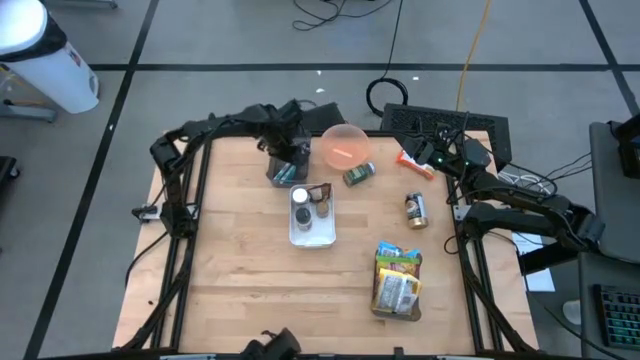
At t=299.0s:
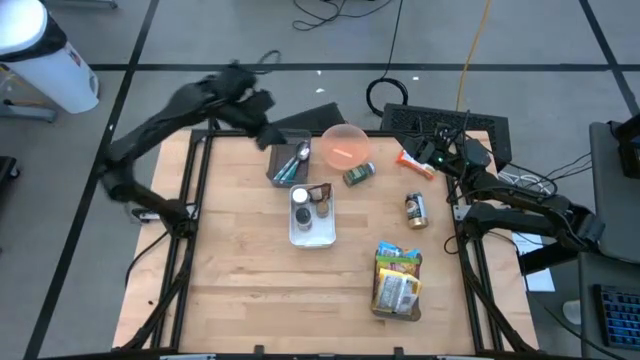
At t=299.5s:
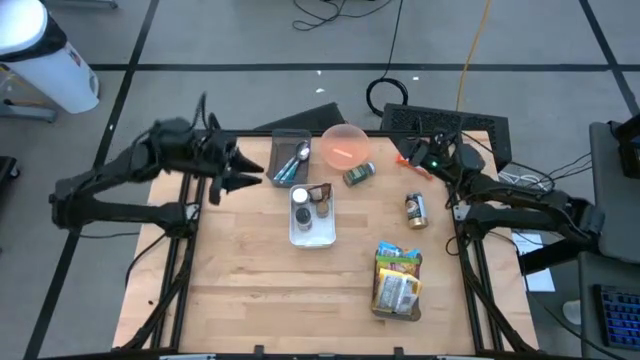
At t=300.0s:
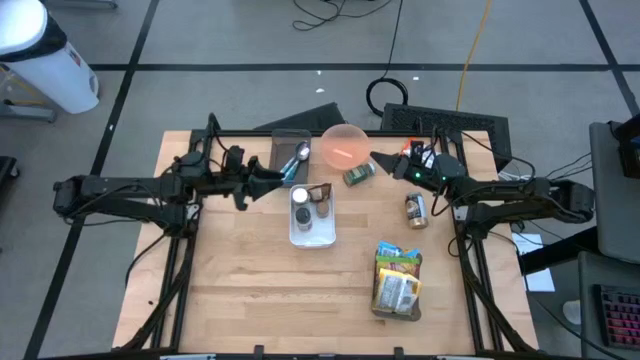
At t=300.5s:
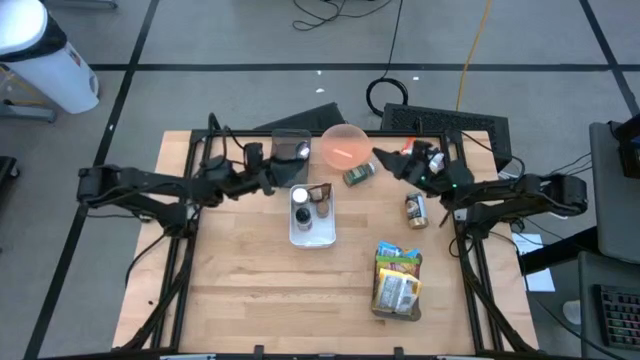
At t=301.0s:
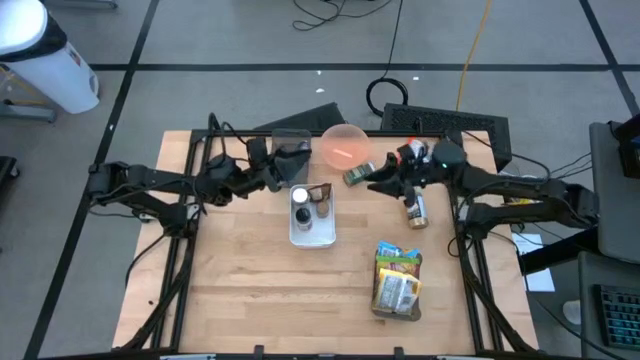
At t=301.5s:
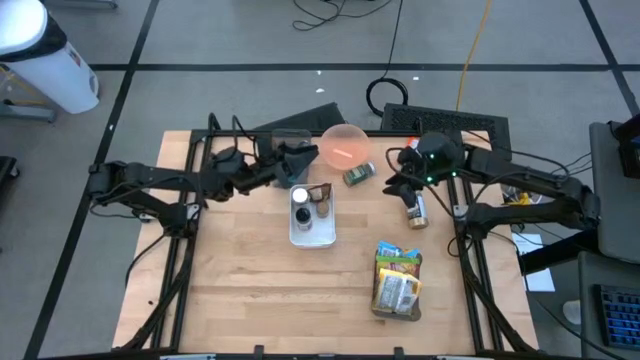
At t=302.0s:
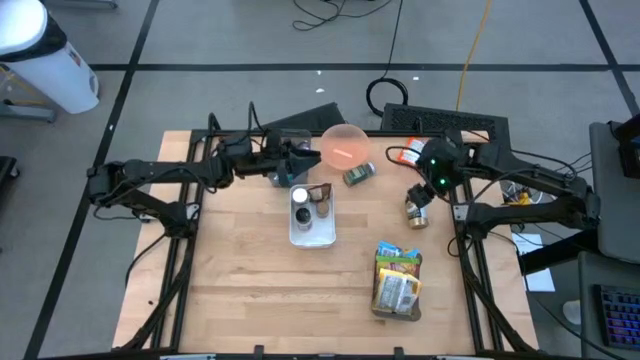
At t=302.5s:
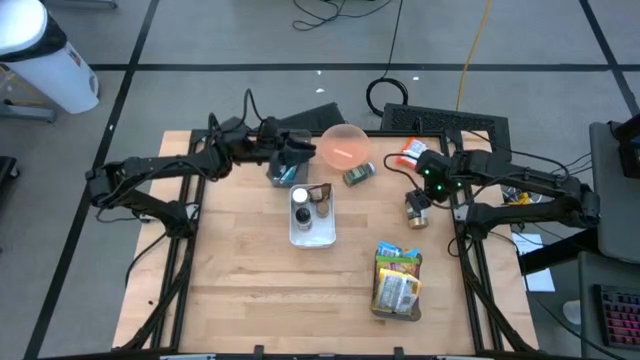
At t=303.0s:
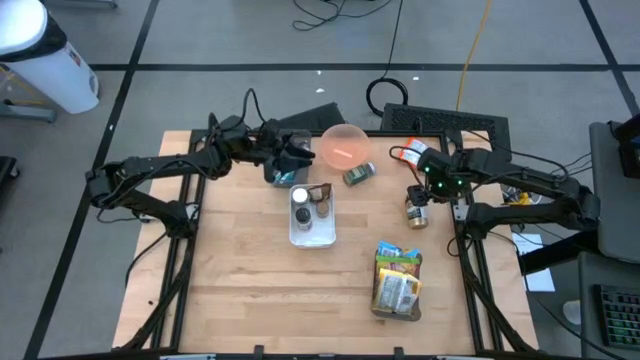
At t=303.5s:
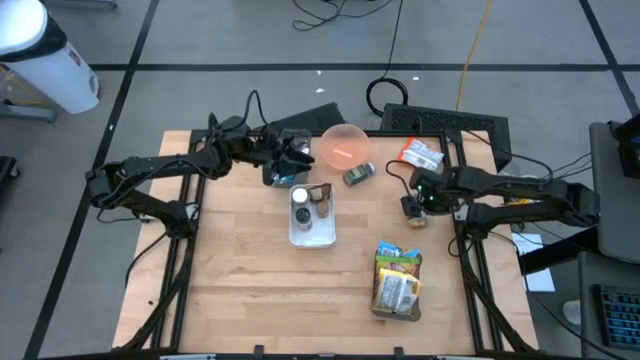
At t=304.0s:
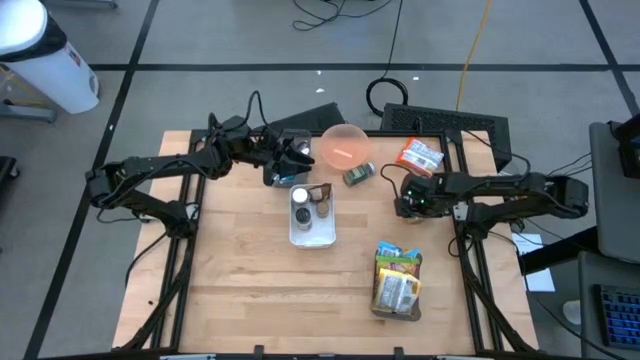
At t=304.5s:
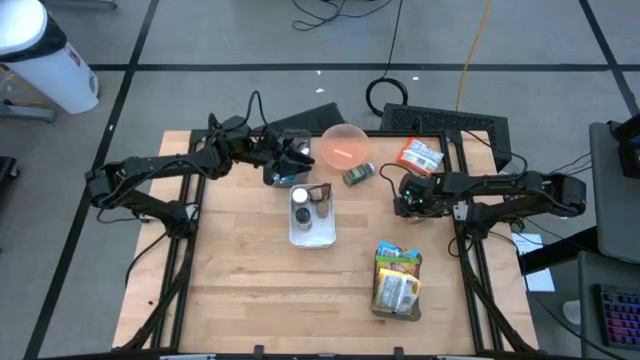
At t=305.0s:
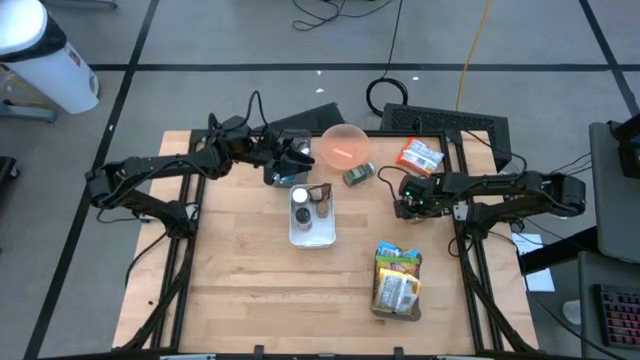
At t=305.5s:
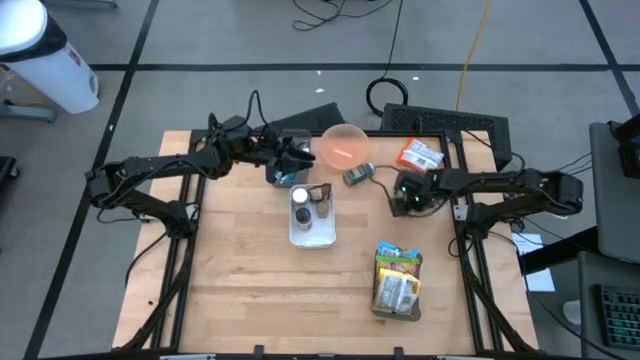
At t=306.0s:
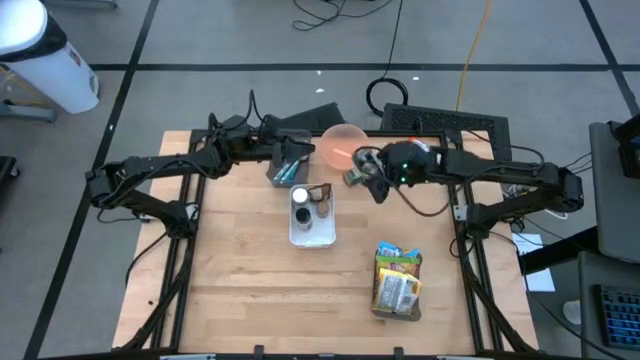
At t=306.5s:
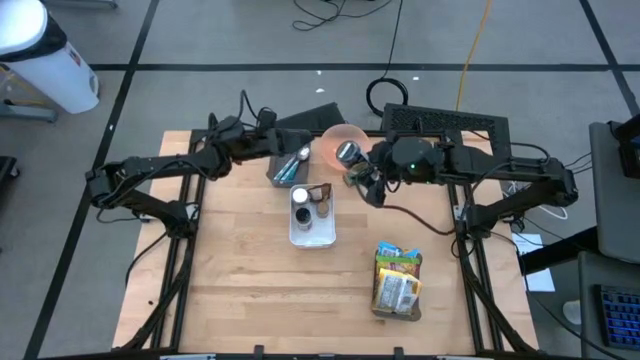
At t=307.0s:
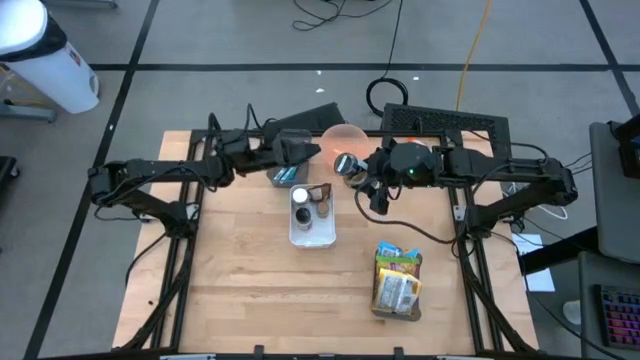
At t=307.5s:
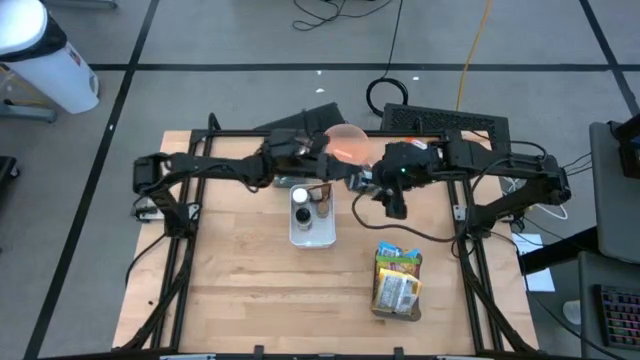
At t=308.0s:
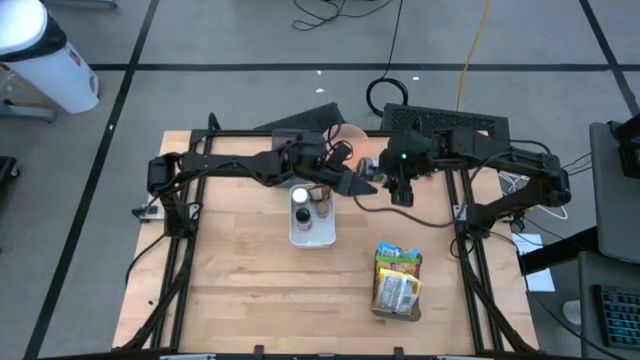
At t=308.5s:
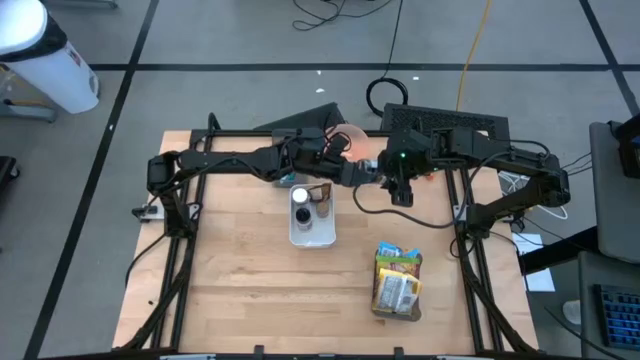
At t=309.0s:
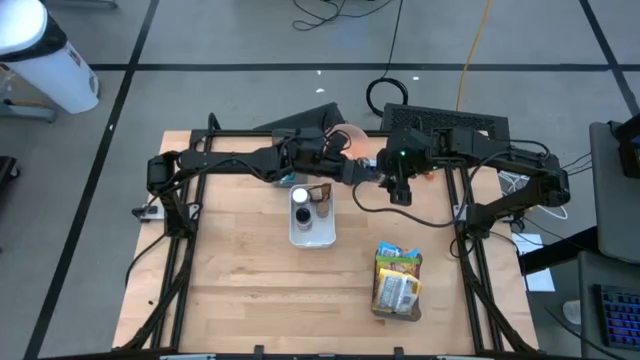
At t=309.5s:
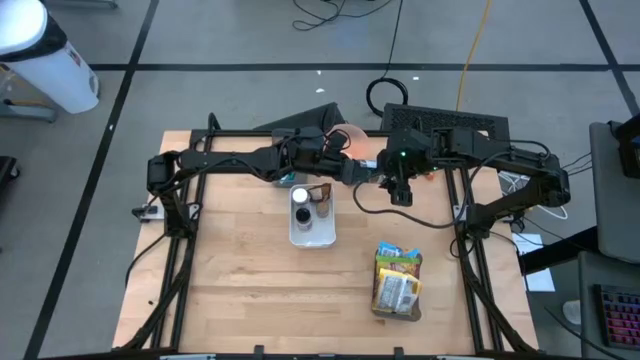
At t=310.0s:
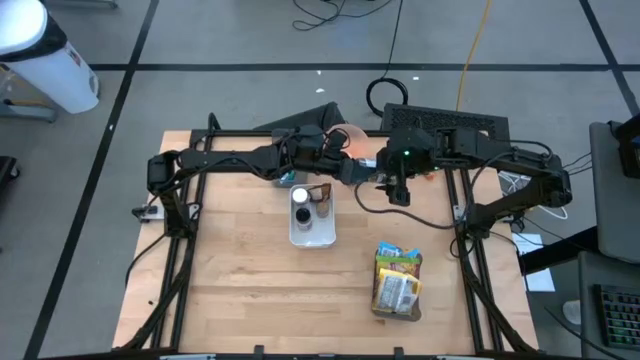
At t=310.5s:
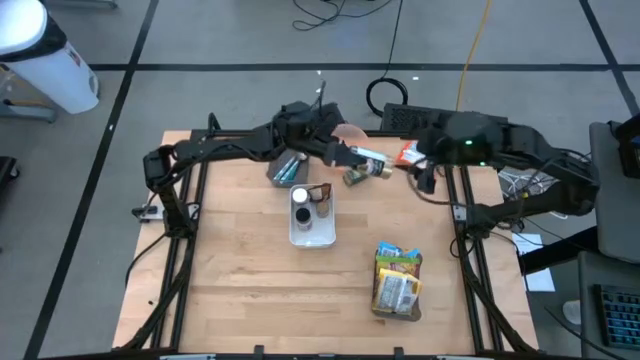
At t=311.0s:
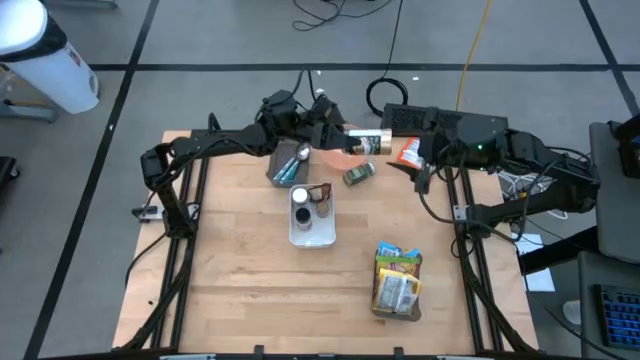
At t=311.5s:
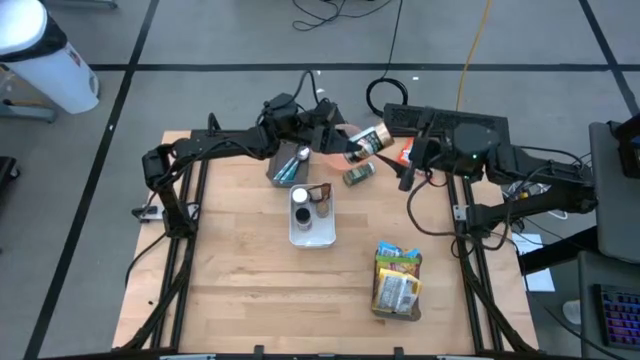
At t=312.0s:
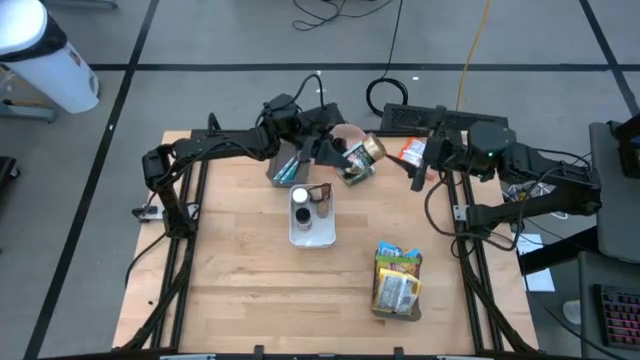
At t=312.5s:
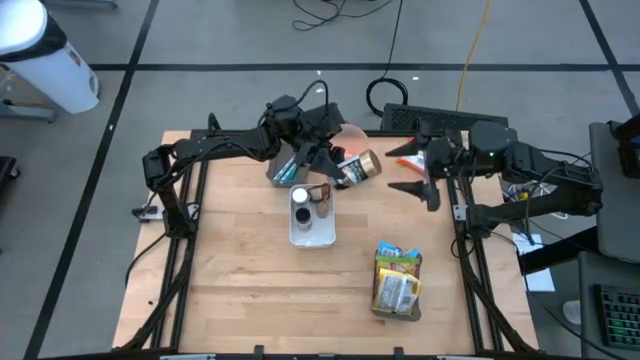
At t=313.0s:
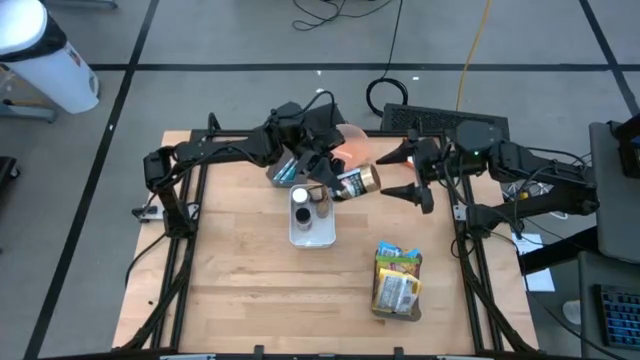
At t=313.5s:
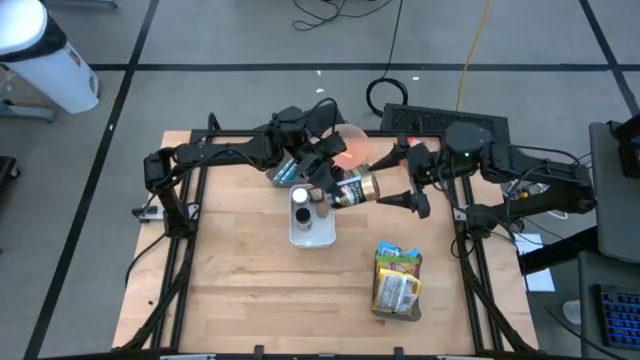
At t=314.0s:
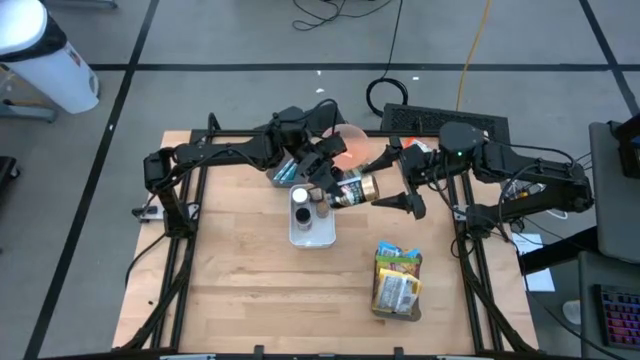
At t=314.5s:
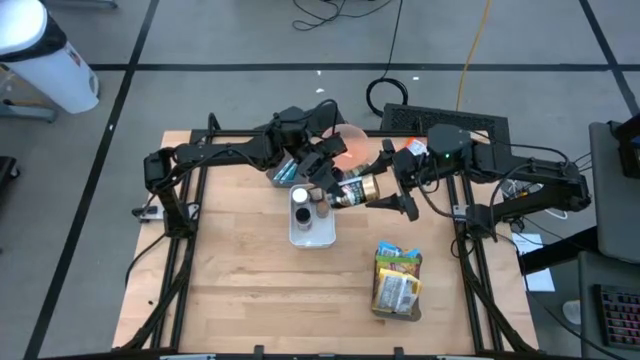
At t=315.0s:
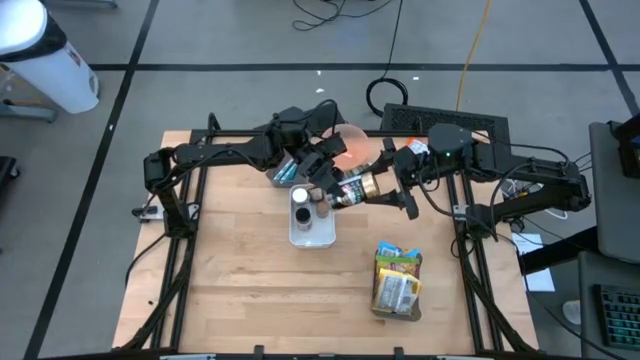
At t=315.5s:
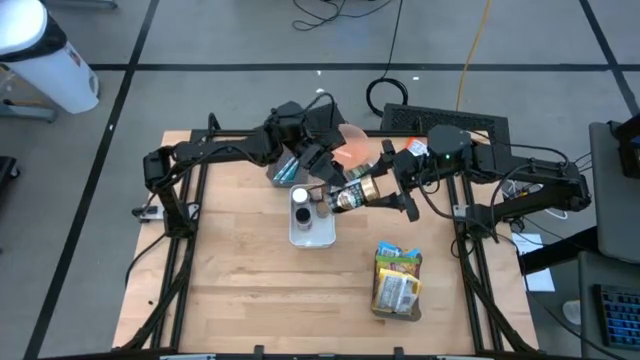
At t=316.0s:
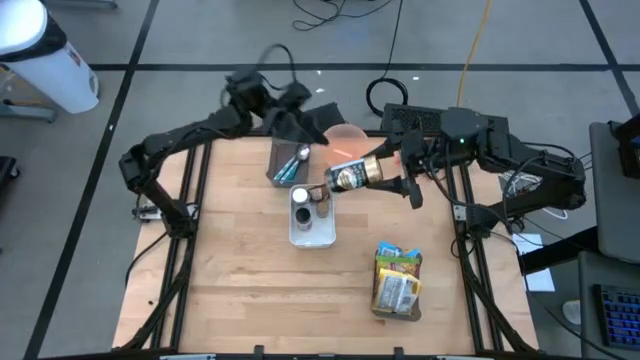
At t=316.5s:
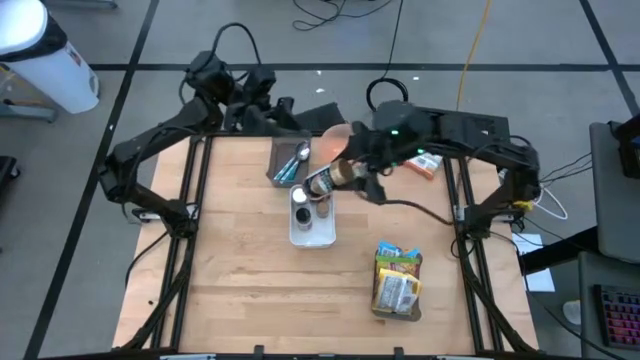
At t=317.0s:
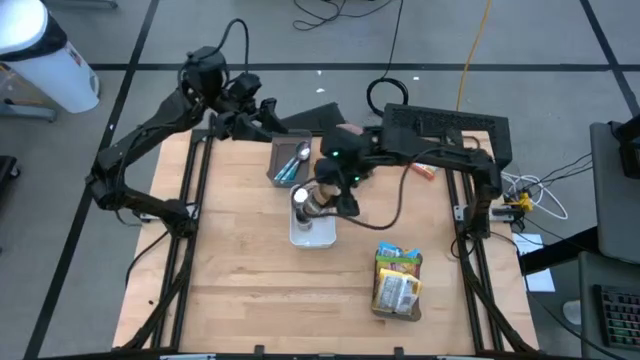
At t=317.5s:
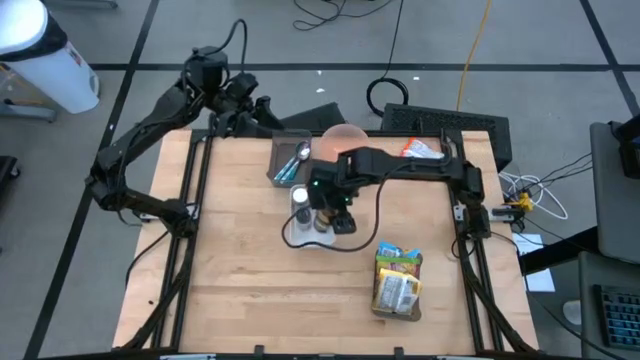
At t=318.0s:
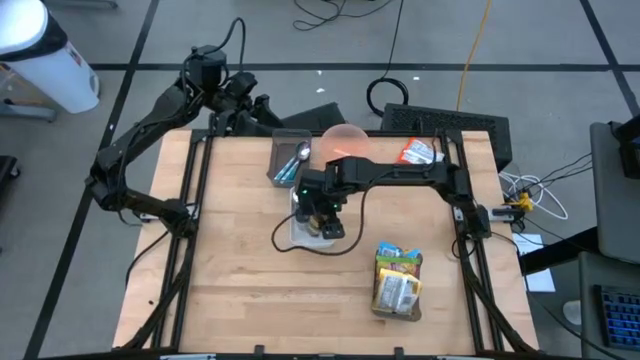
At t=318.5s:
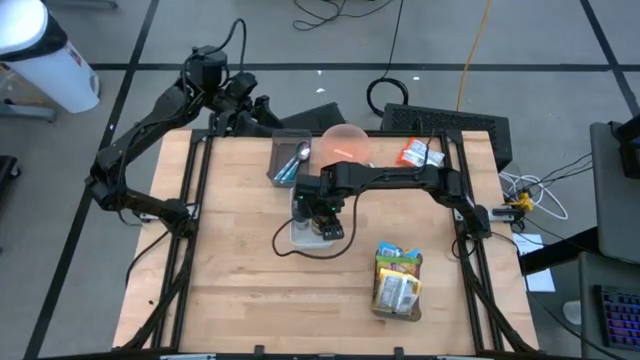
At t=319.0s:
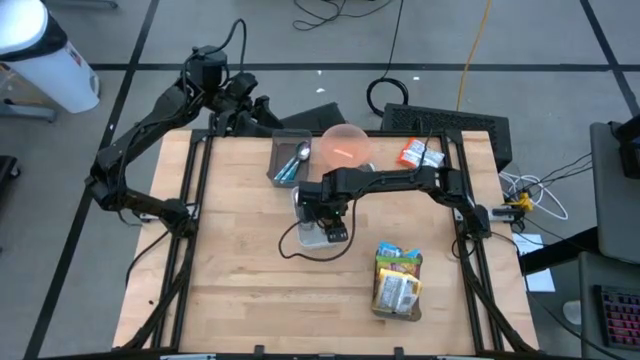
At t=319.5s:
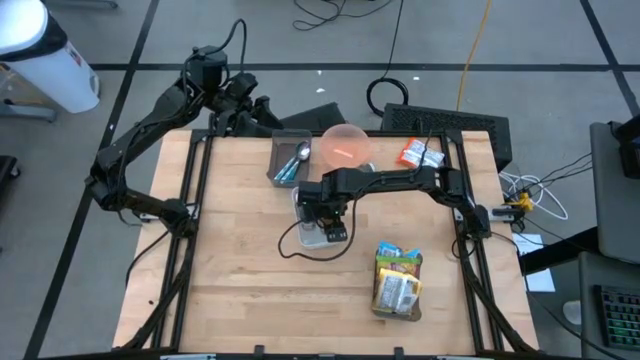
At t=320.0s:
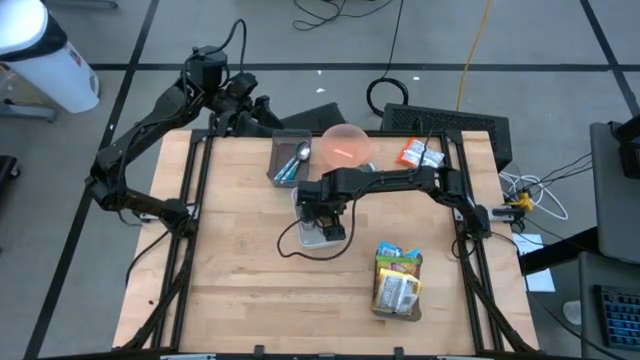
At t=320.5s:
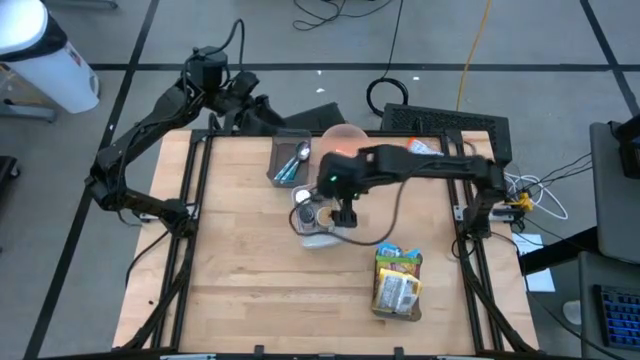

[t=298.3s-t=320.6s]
Task: Pick & Place Food Item
Put the golden seasoning bottle into the white bin
